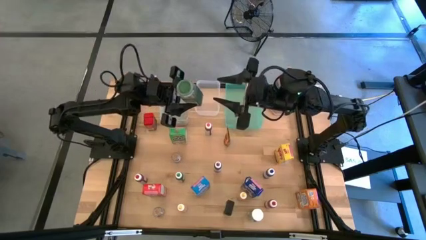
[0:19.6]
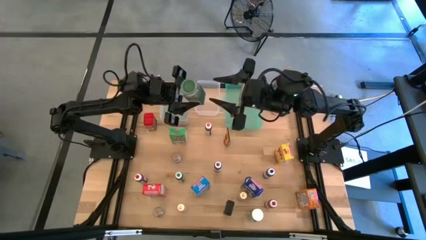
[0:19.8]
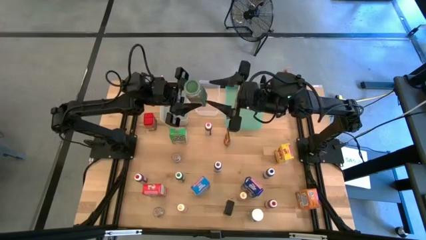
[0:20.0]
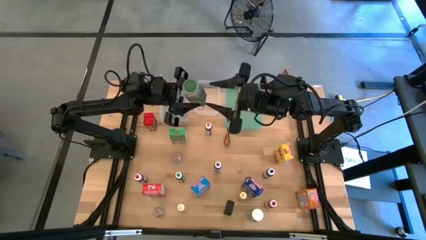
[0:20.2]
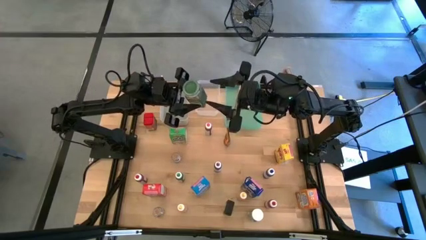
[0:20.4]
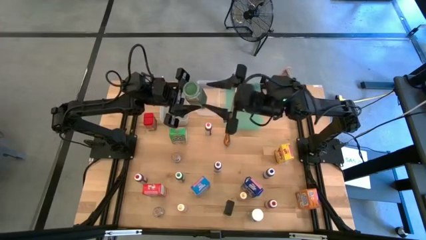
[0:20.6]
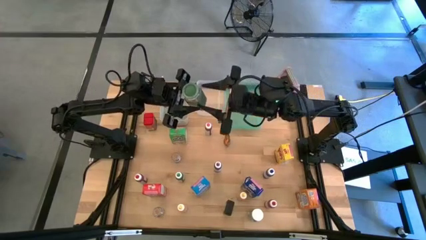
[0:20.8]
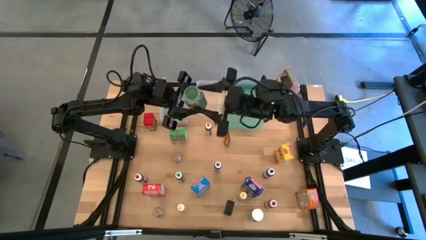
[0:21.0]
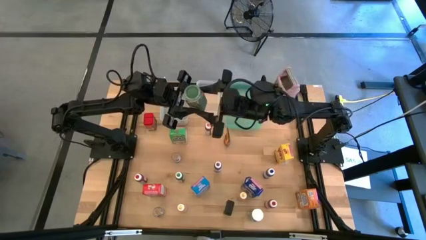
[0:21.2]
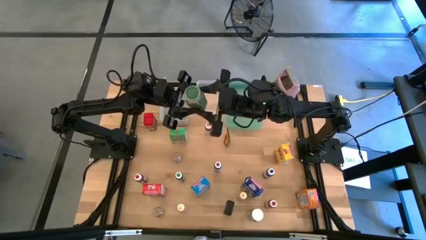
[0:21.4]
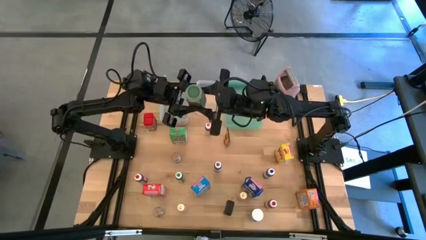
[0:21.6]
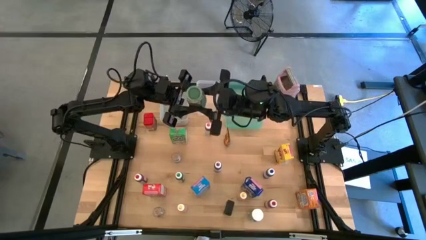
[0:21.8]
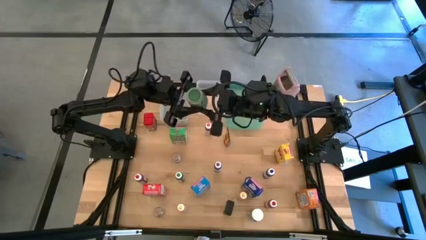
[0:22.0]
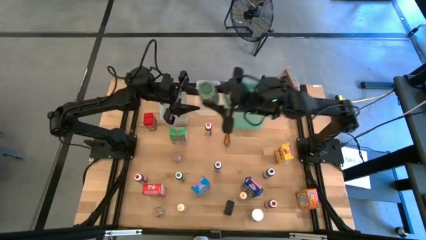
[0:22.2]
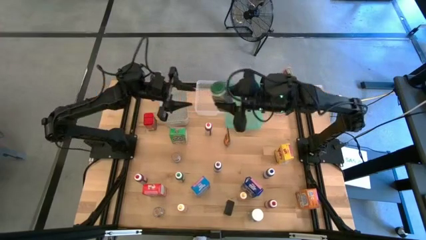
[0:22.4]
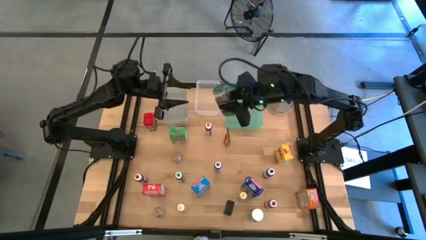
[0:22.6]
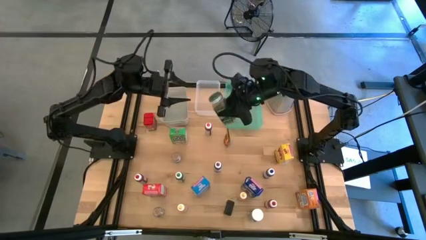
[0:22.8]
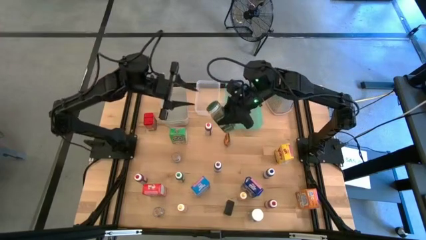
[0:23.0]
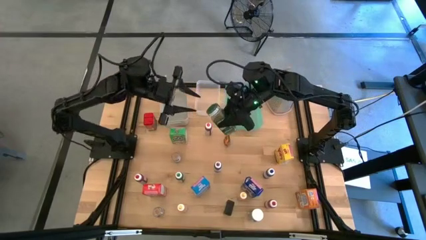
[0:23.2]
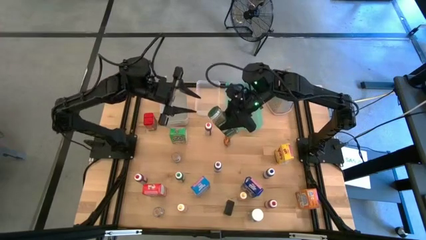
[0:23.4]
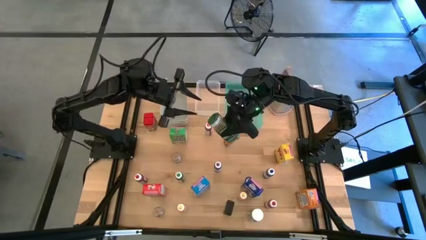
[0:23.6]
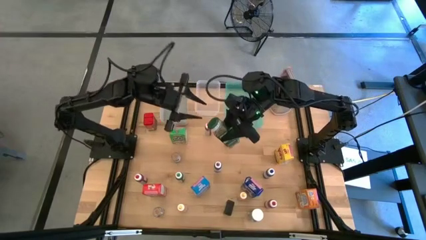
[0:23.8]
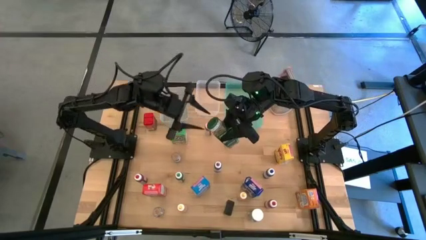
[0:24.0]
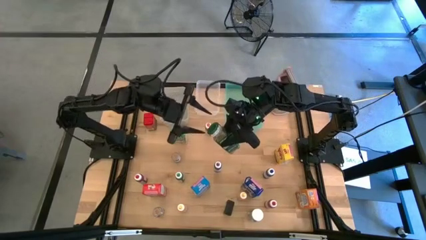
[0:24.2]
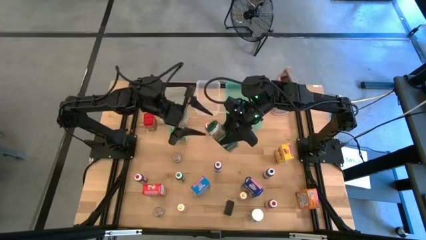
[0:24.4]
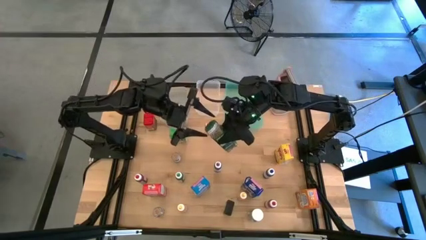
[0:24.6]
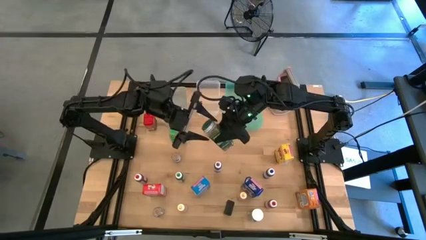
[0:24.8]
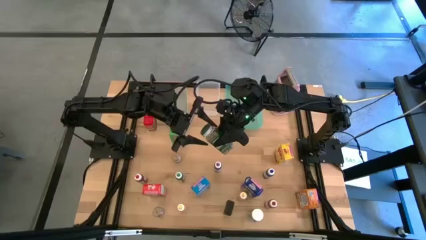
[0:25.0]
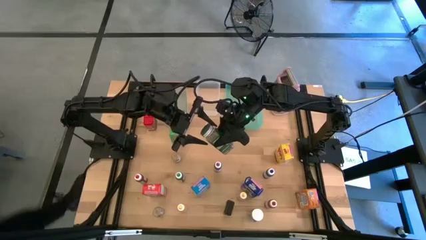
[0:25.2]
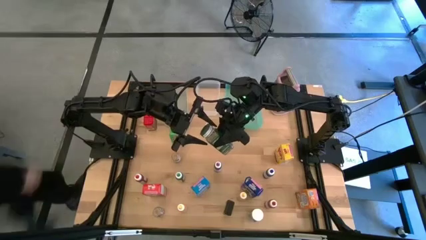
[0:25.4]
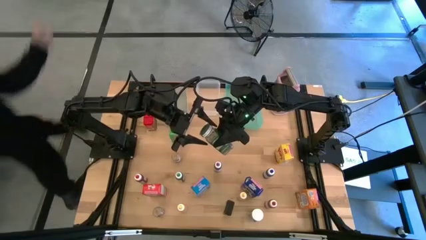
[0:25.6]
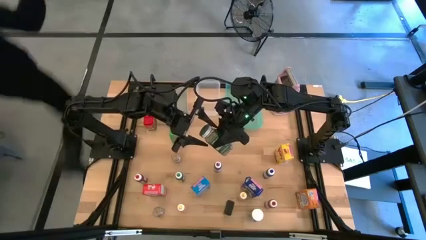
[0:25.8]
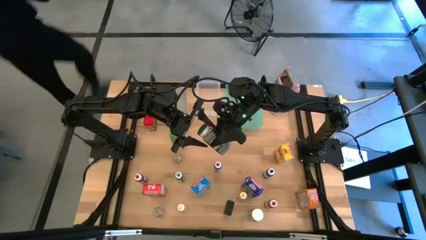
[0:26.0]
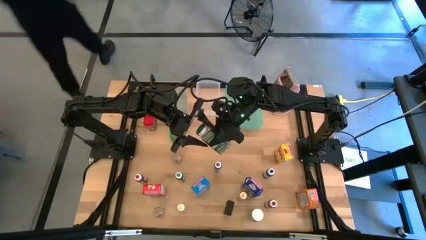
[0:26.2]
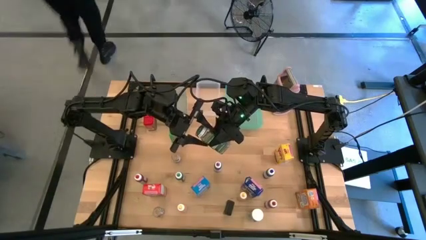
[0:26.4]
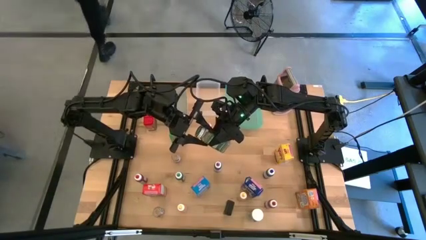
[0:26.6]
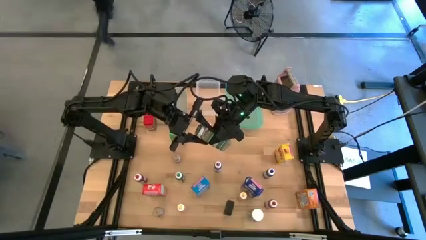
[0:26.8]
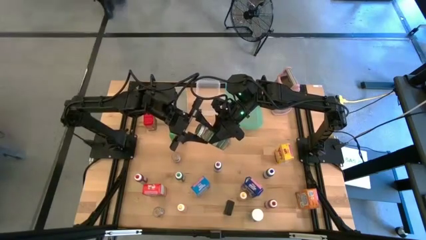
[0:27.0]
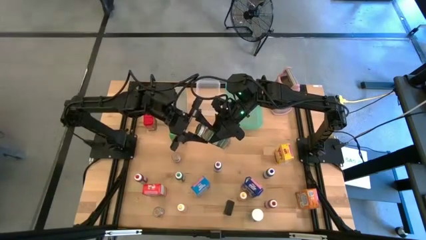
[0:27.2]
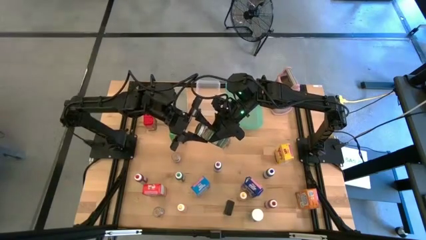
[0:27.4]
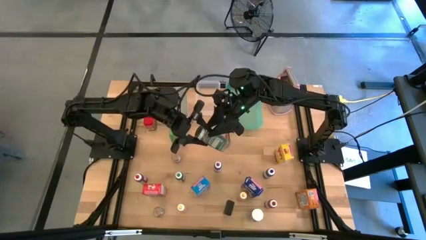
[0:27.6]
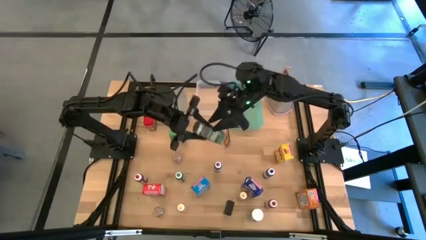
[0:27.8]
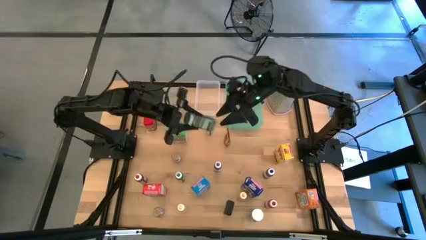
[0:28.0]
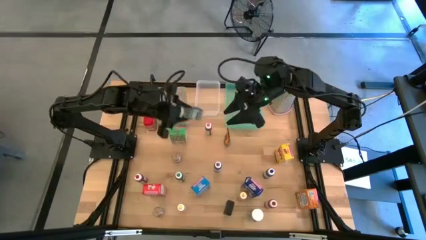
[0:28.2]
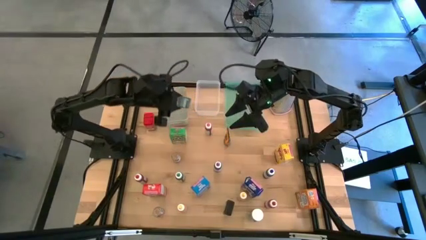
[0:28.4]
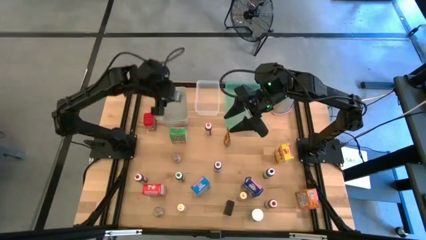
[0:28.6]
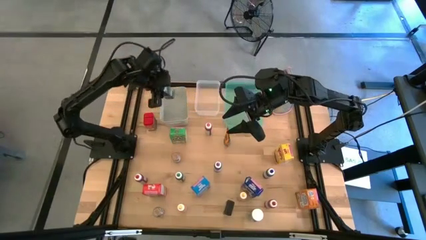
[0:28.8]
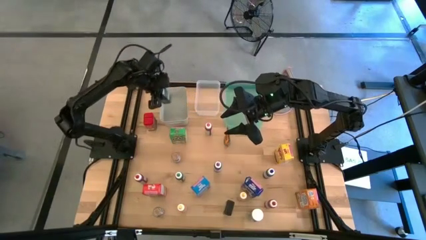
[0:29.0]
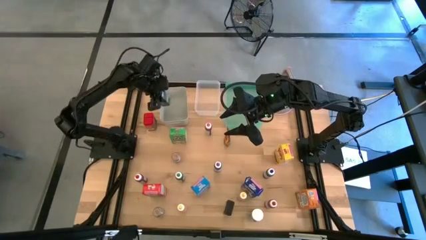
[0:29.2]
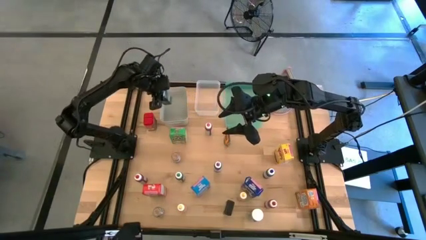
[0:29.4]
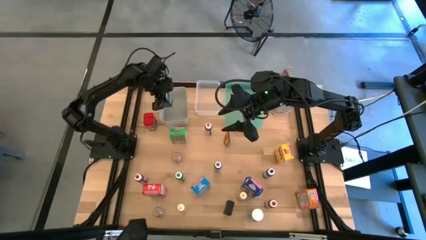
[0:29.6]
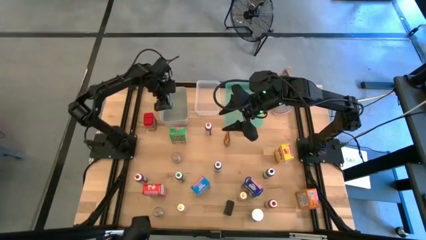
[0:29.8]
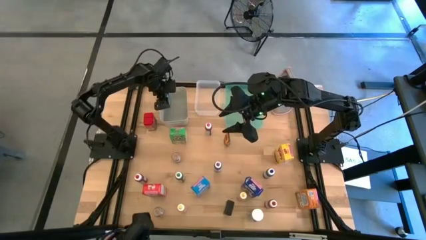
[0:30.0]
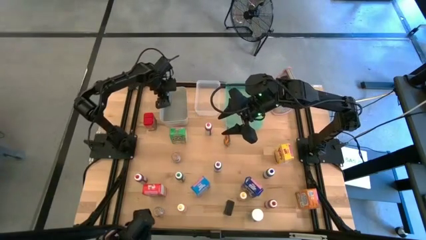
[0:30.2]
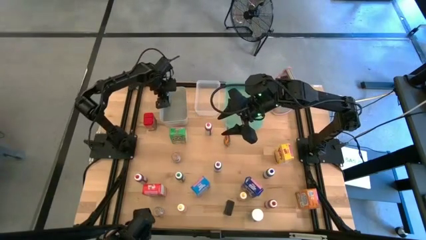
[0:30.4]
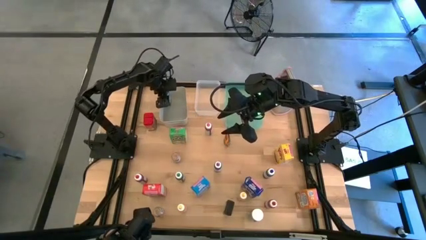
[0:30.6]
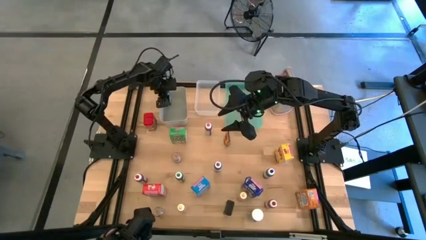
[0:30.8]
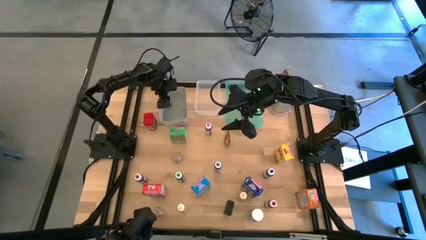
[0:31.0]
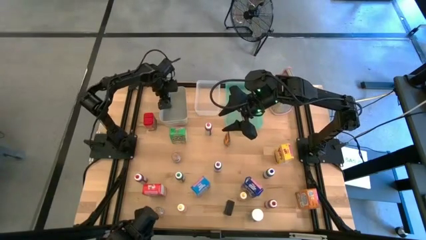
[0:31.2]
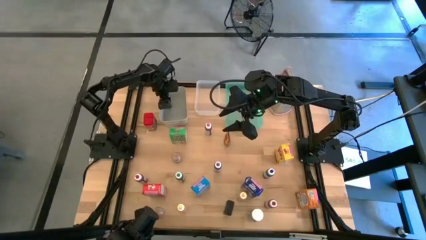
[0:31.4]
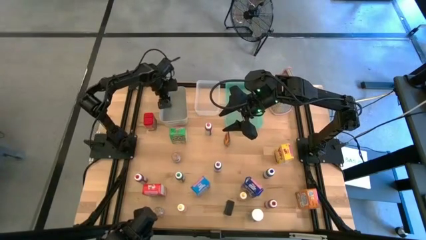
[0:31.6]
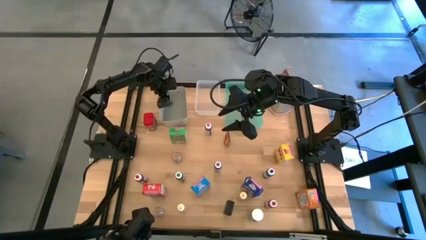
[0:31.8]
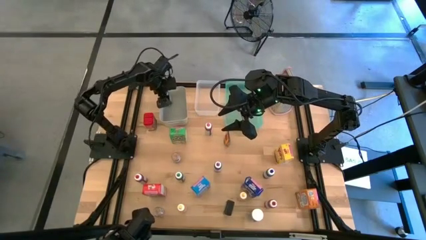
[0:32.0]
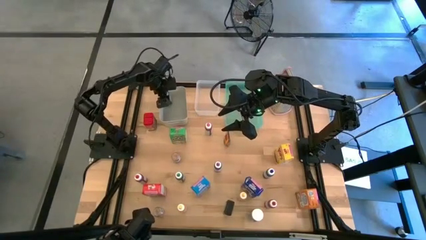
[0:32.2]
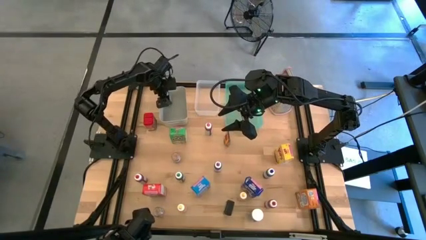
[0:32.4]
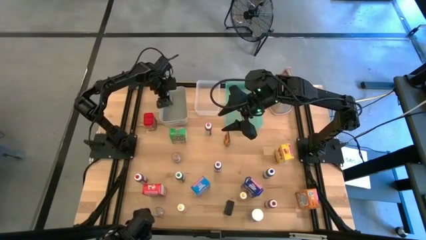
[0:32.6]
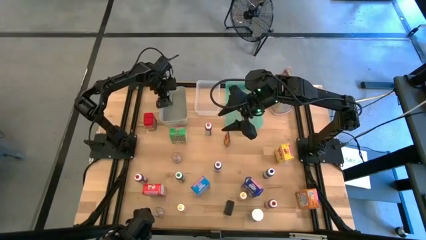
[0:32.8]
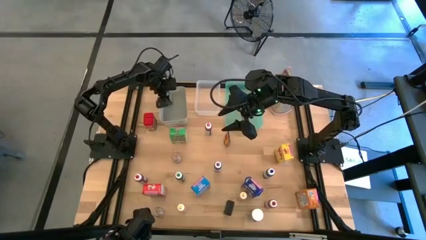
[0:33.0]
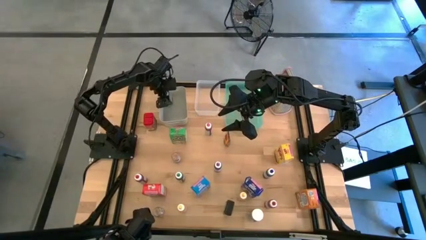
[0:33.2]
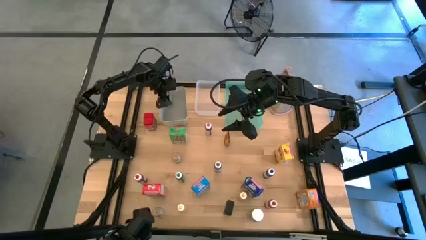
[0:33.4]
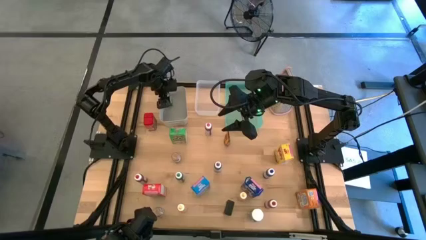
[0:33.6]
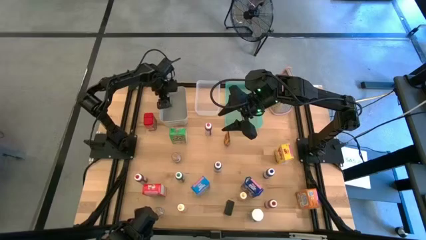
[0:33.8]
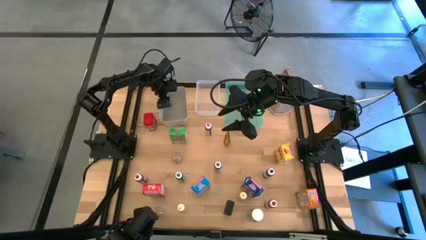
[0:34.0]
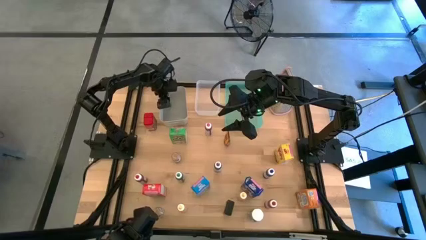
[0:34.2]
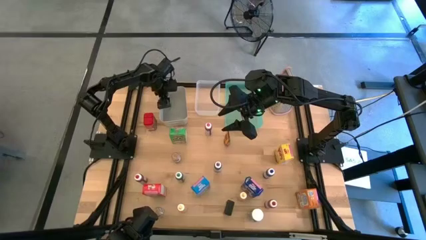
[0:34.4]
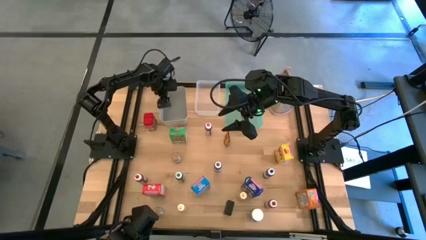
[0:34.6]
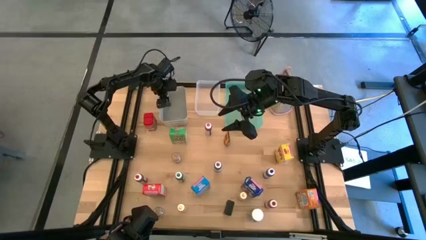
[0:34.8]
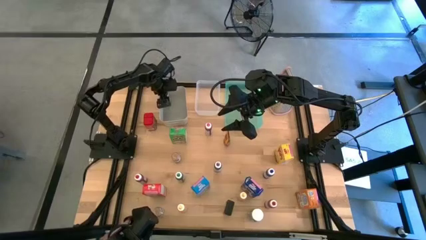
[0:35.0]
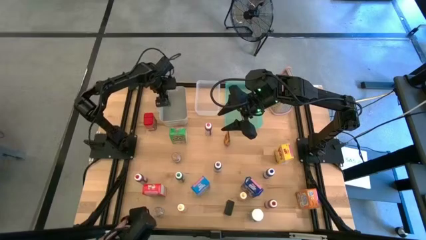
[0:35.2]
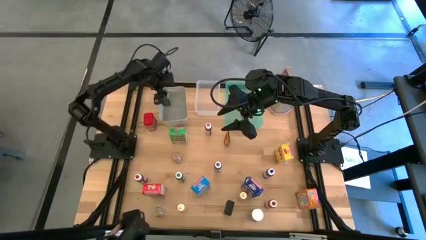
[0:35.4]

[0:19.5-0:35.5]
Task: Pick & Place Kitchen Items
Put the green seasoning bottle into the gray bin
